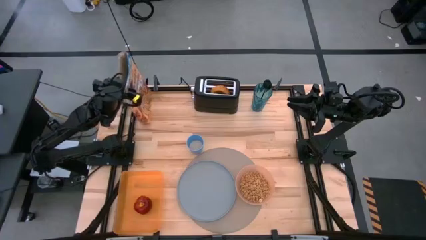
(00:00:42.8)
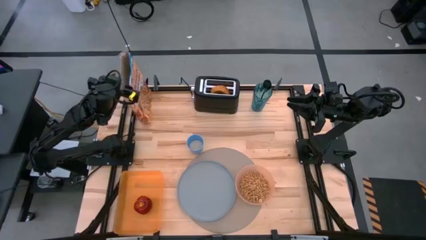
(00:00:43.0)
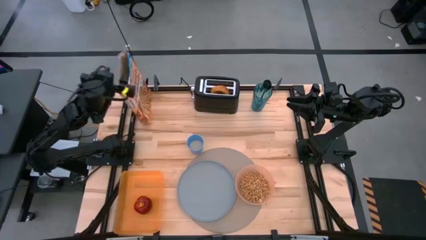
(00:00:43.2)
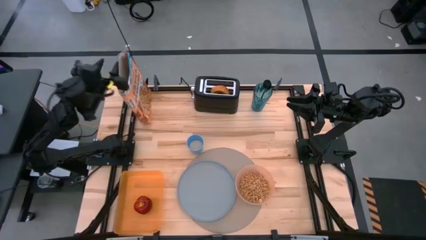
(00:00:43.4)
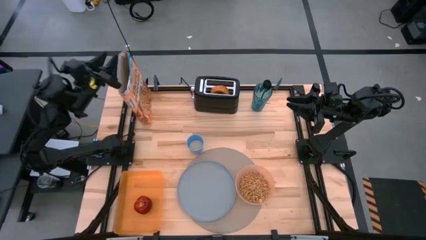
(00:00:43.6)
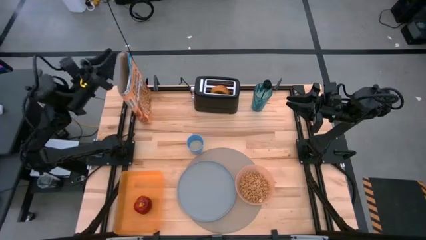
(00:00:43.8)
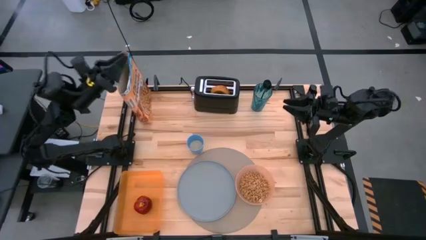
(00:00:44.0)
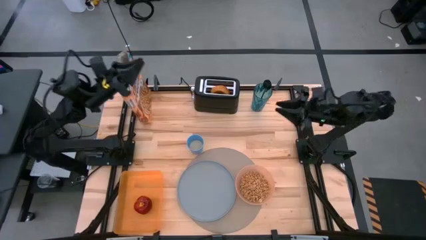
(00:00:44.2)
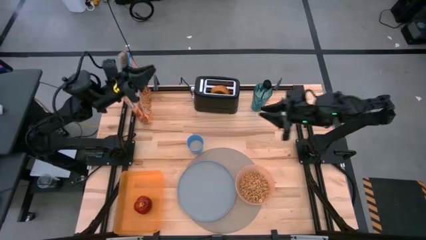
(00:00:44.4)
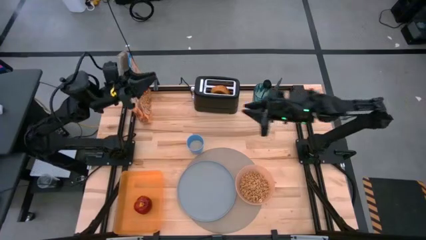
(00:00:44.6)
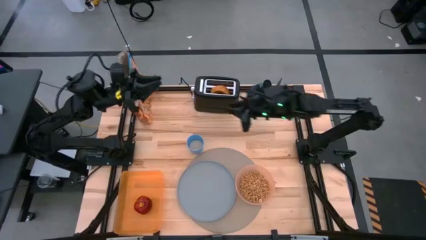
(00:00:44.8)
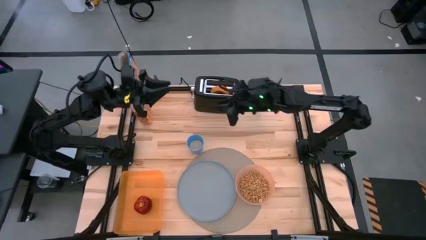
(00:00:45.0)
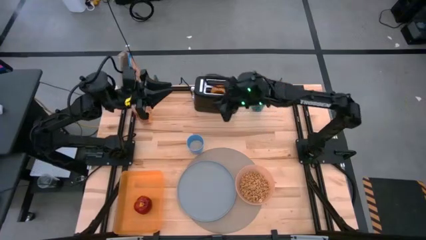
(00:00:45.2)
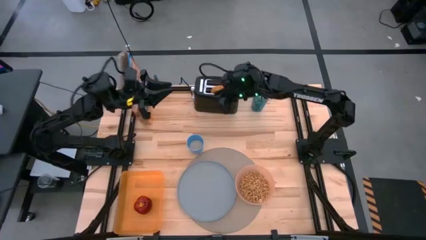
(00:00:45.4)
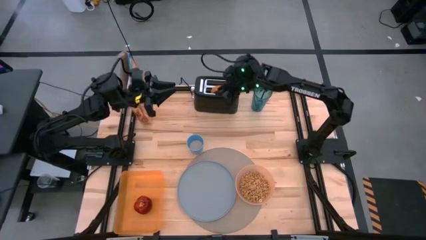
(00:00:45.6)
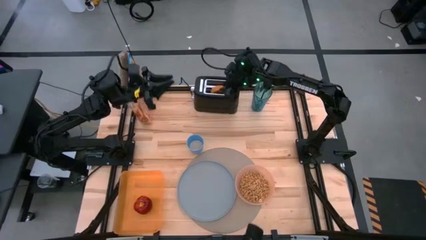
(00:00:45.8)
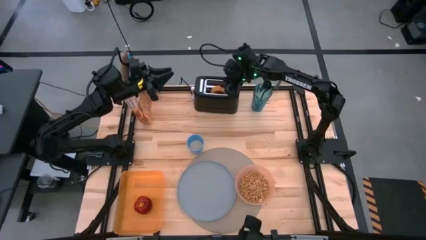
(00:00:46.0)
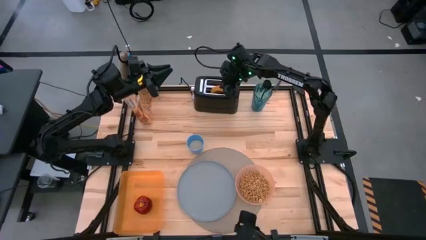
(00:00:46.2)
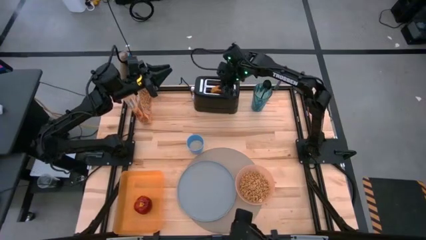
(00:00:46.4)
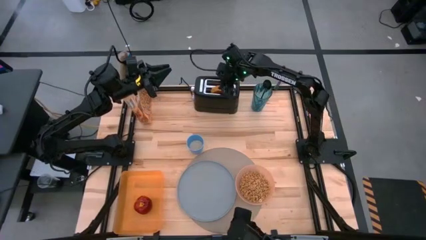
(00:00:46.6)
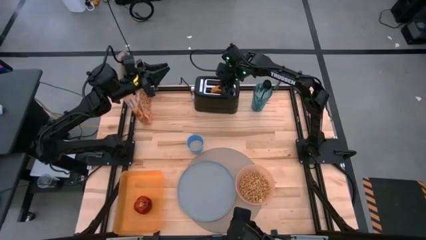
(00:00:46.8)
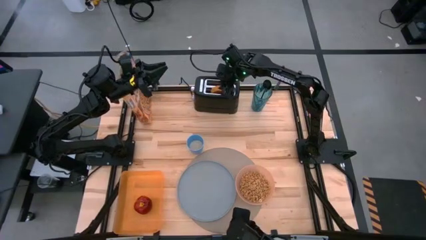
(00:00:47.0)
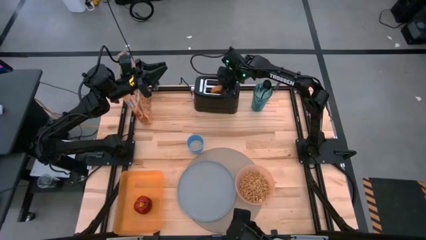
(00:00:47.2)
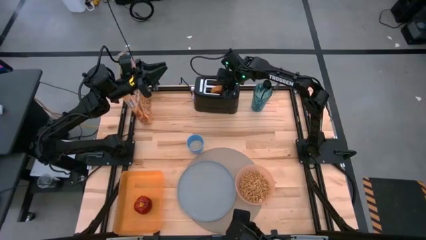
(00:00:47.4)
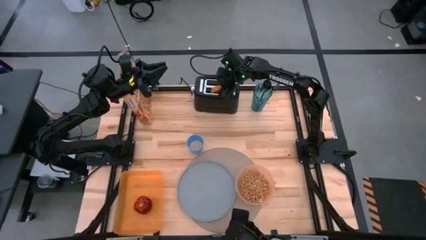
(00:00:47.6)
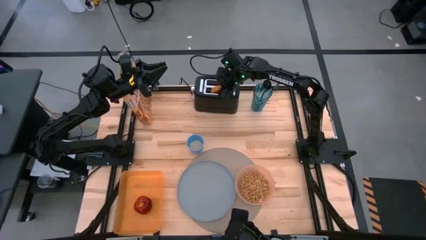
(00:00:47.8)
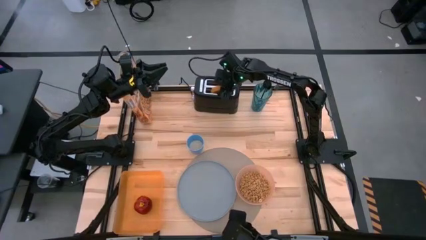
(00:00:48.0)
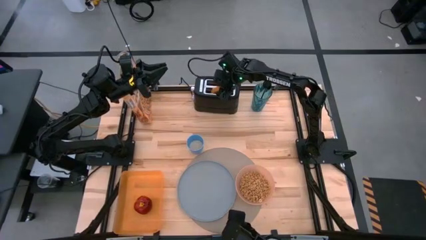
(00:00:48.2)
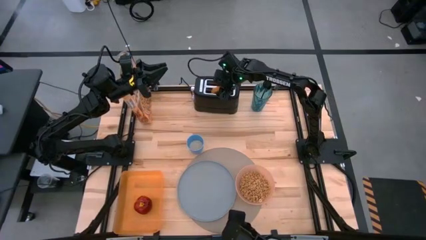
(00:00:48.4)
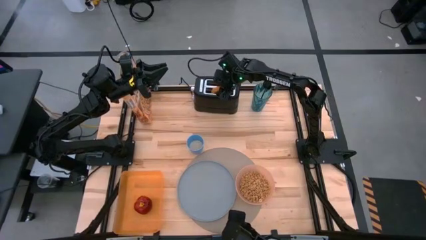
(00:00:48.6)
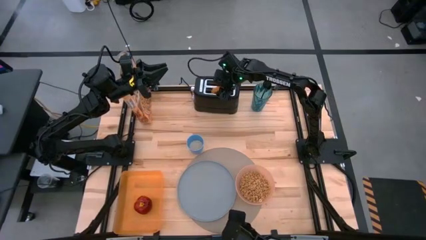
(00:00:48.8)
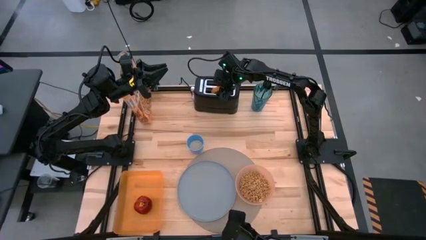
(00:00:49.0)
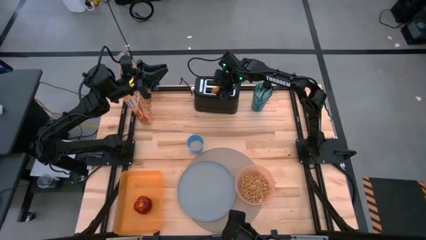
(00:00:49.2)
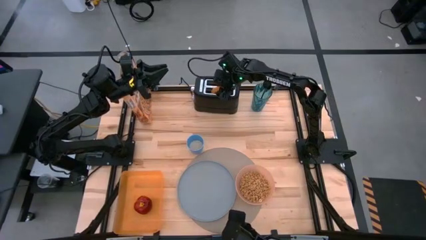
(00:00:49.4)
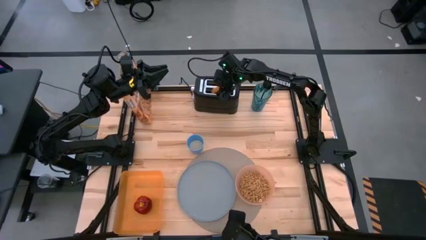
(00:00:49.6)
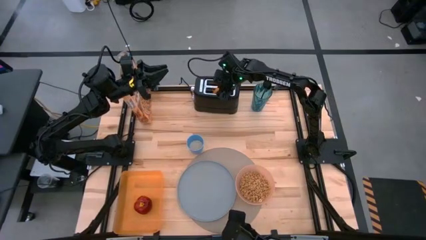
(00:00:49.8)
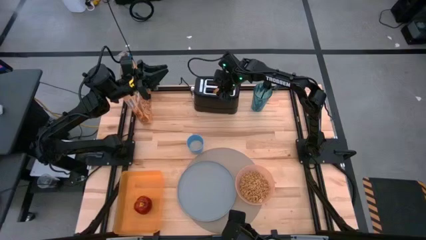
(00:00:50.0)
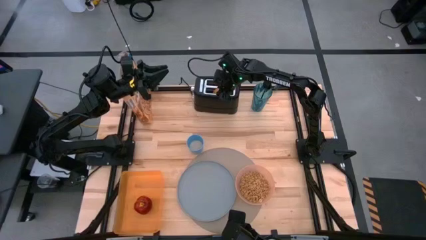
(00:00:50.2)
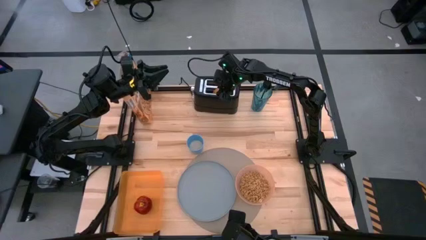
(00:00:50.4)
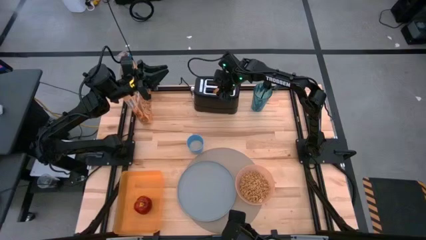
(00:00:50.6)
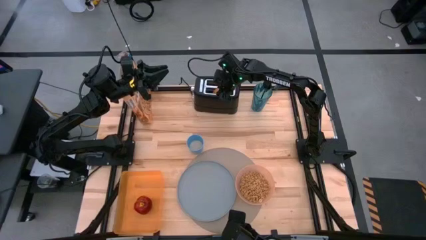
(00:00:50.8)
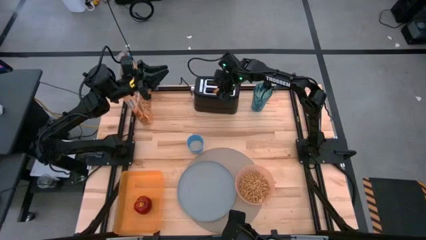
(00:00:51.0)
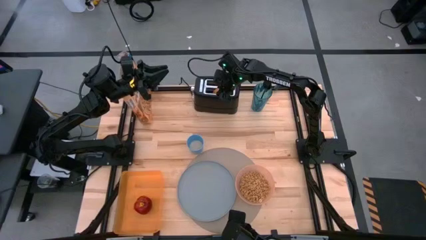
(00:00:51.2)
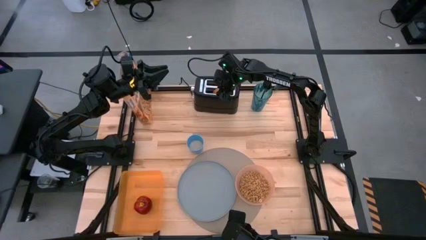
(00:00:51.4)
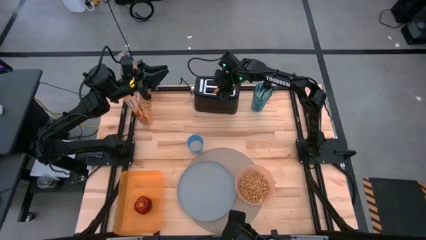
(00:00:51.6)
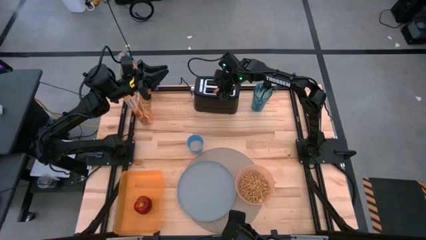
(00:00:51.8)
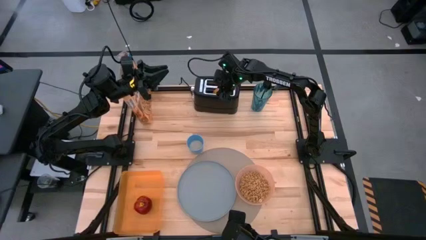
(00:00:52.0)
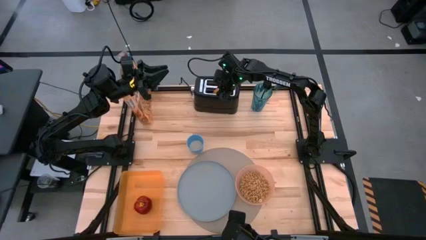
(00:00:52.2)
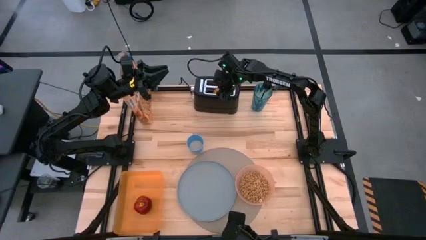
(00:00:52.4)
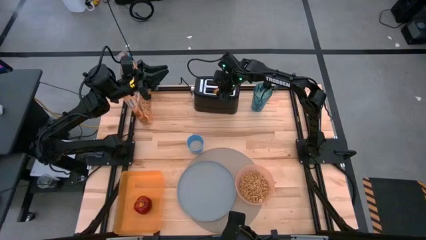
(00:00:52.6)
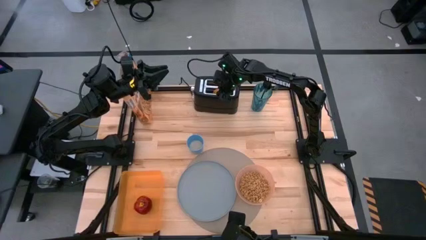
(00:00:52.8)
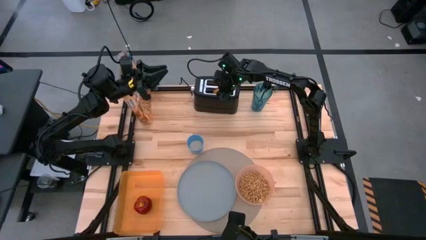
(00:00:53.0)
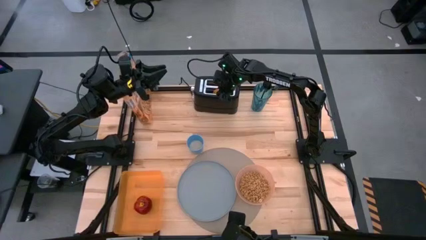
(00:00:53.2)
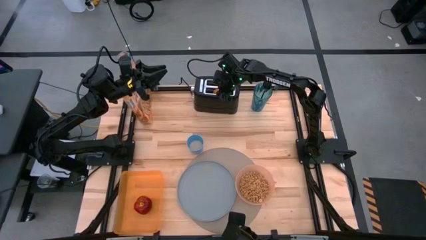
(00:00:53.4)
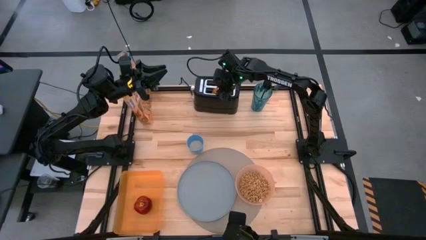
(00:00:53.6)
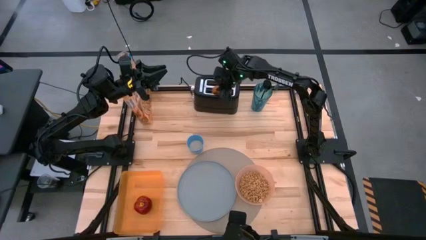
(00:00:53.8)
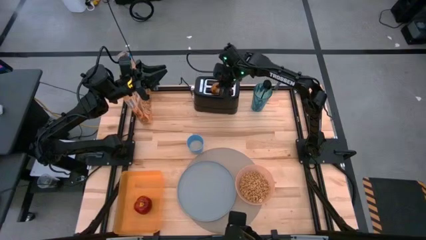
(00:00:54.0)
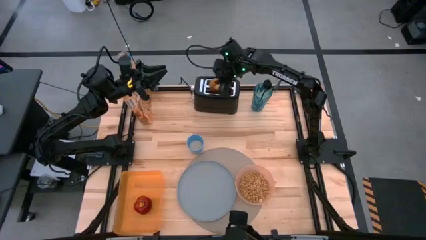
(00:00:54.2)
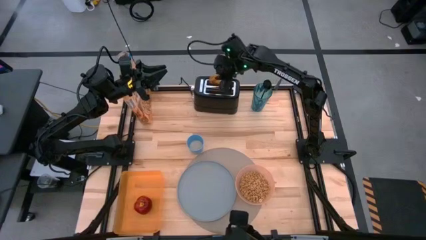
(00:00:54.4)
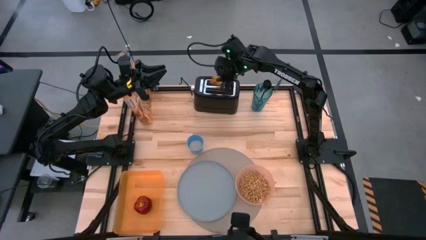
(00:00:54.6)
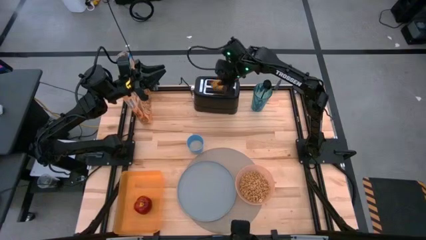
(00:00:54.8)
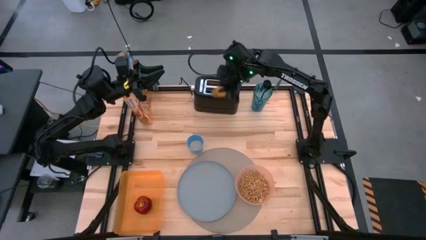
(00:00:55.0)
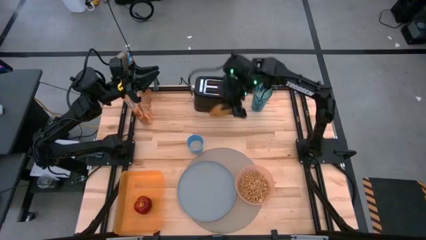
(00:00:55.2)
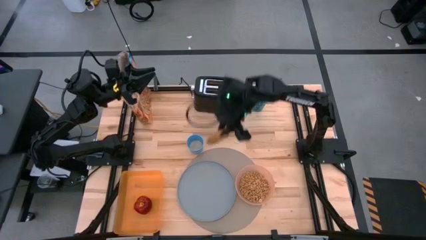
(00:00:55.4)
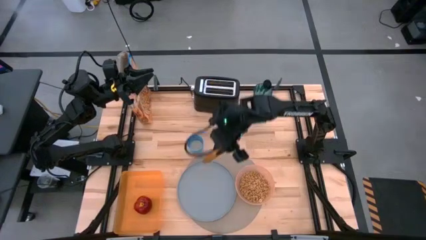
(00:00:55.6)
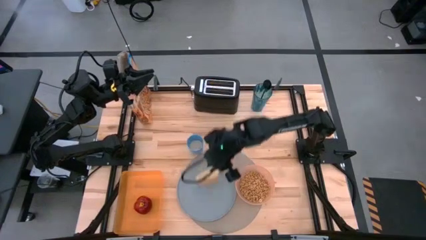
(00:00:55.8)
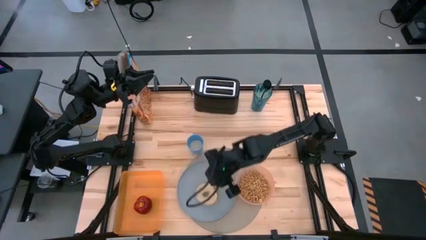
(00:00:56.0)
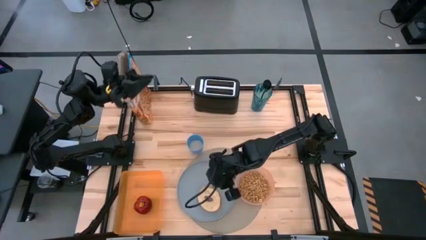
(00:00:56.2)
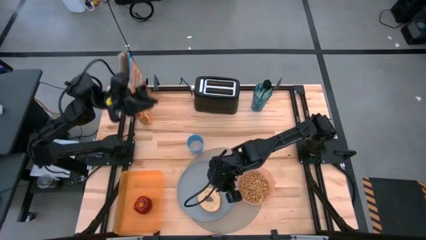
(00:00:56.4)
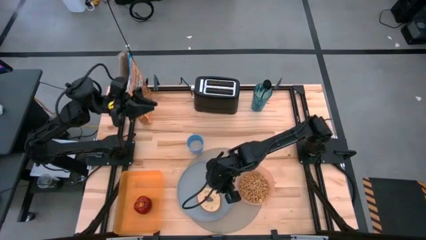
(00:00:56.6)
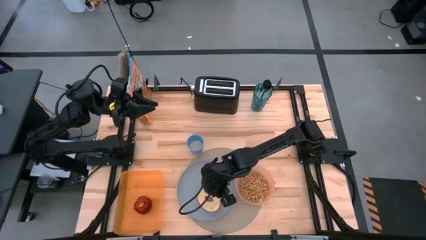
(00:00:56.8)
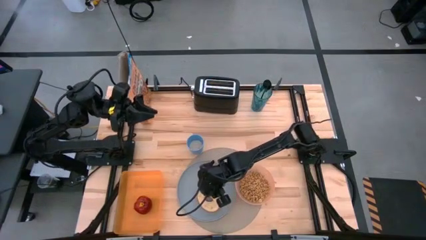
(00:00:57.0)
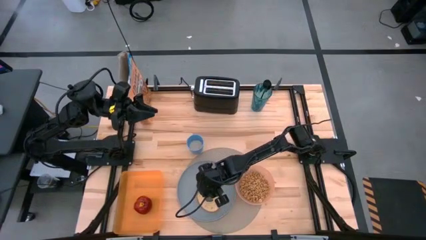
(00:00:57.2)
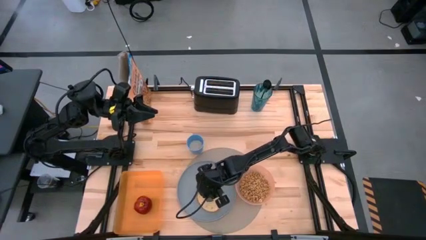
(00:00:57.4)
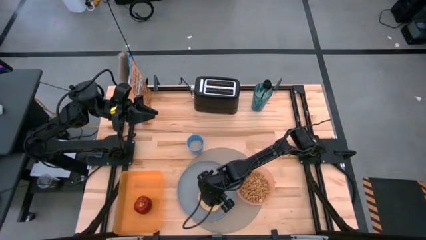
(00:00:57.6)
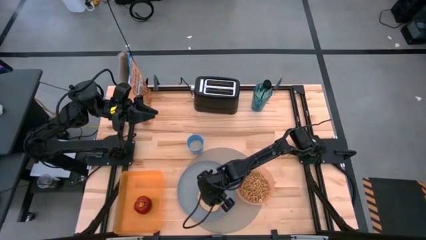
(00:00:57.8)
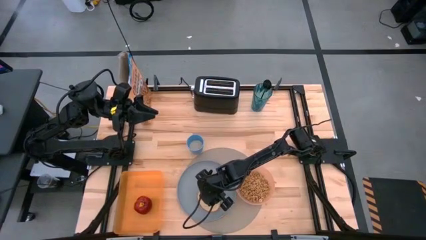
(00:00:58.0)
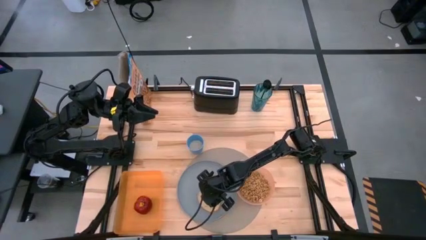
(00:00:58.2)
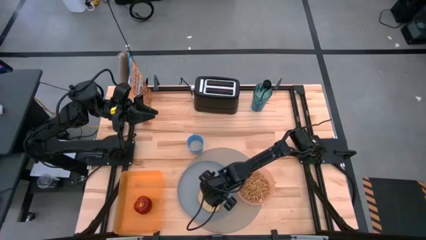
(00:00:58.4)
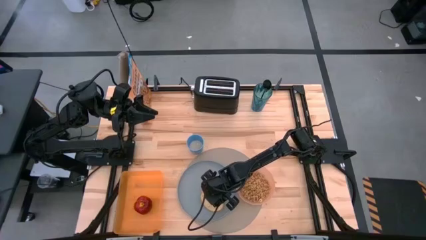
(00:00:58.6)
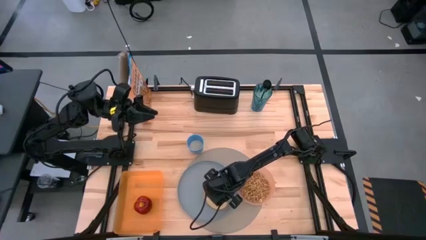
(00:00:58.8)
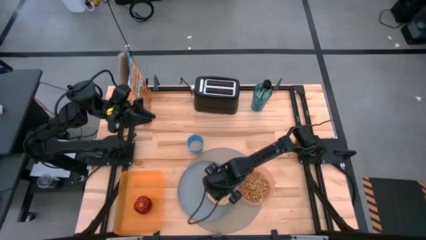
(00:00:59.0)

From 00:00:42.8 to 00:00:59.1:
Task: Arrange a breakfast setting
Put the bagel bread from the toaster on the gray plate
